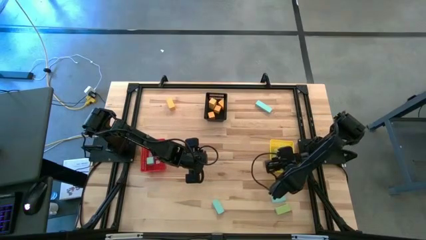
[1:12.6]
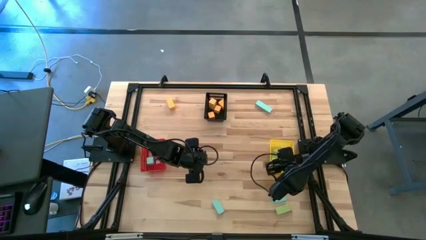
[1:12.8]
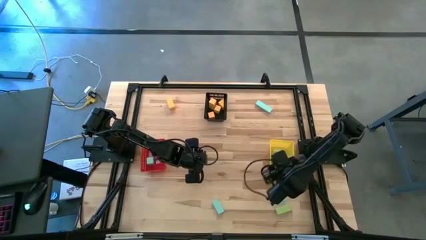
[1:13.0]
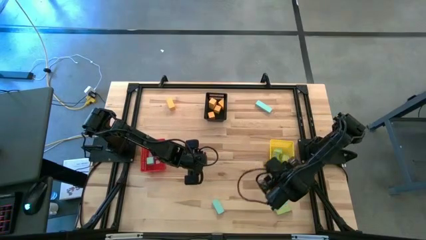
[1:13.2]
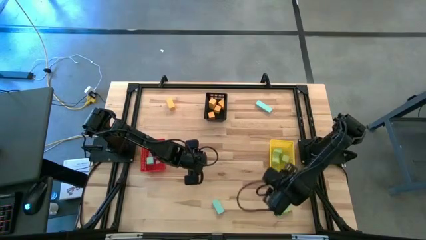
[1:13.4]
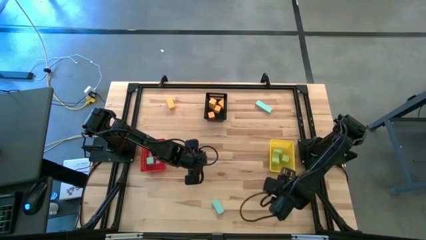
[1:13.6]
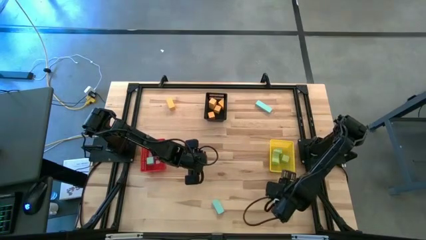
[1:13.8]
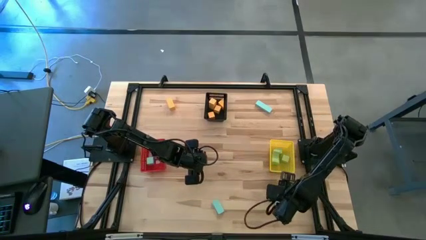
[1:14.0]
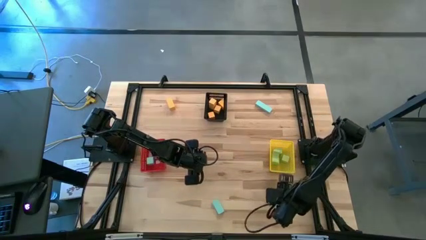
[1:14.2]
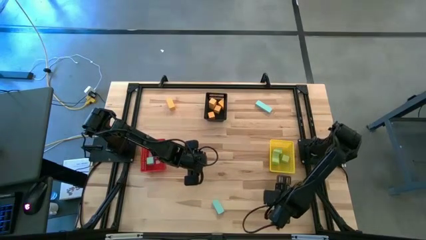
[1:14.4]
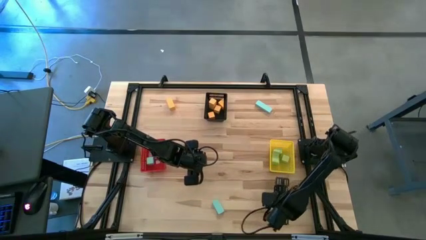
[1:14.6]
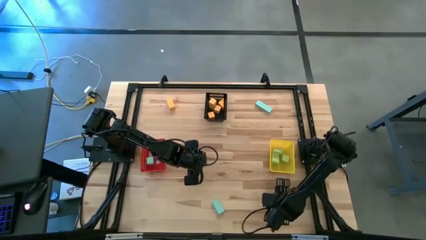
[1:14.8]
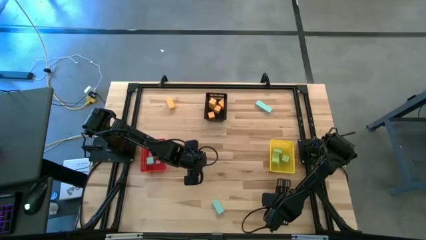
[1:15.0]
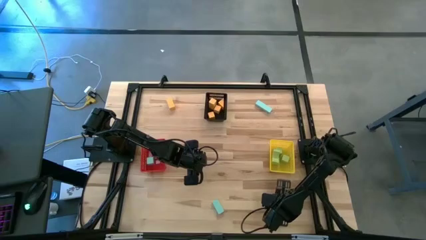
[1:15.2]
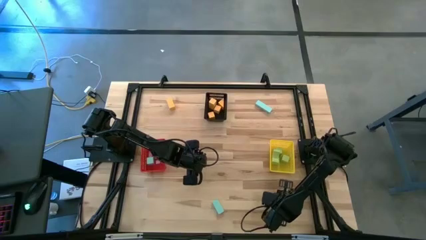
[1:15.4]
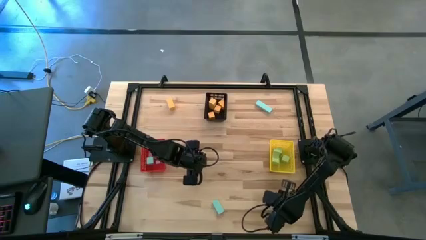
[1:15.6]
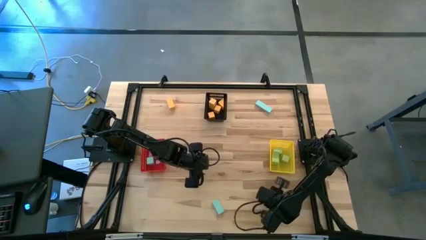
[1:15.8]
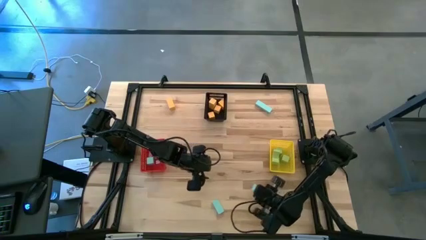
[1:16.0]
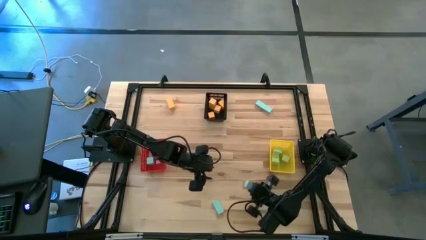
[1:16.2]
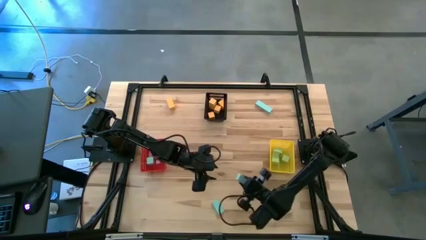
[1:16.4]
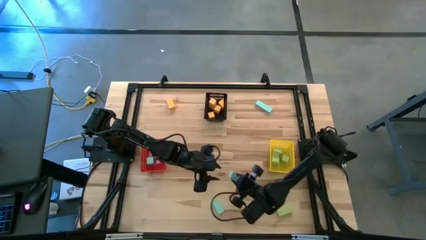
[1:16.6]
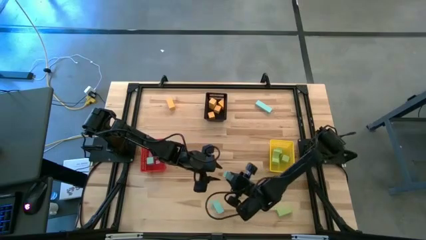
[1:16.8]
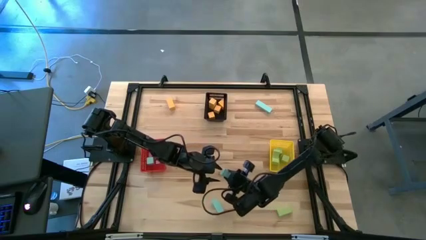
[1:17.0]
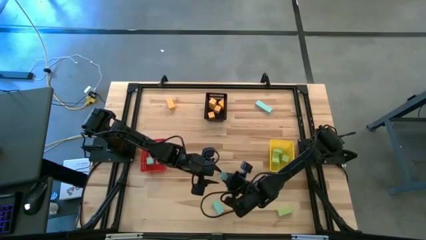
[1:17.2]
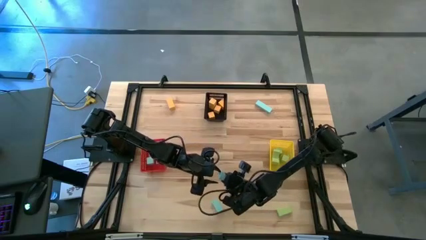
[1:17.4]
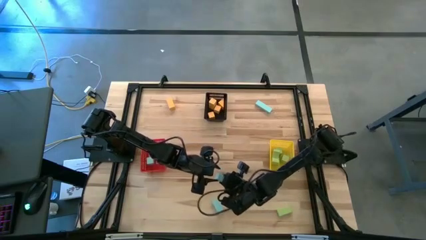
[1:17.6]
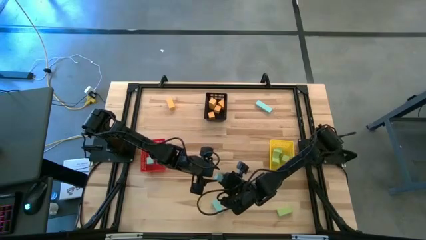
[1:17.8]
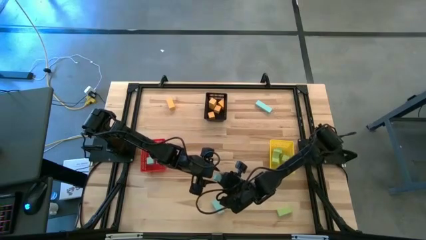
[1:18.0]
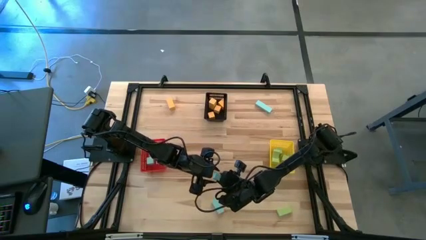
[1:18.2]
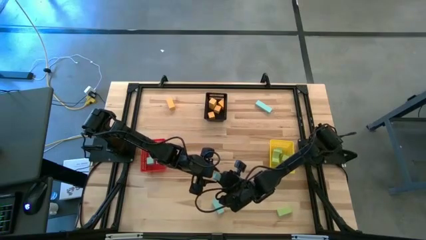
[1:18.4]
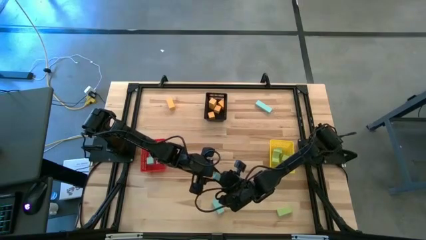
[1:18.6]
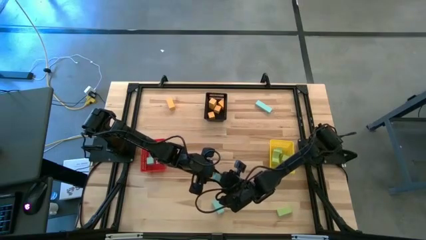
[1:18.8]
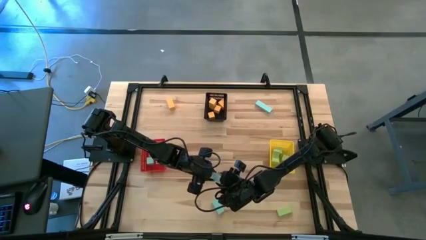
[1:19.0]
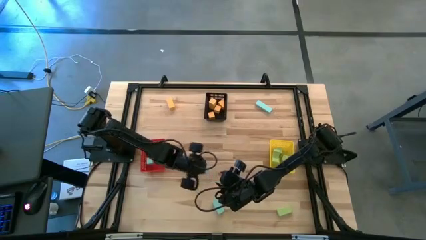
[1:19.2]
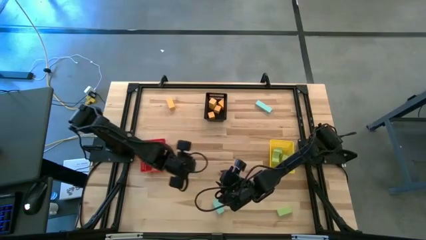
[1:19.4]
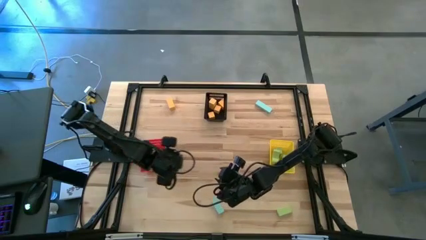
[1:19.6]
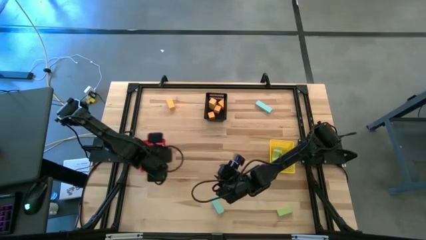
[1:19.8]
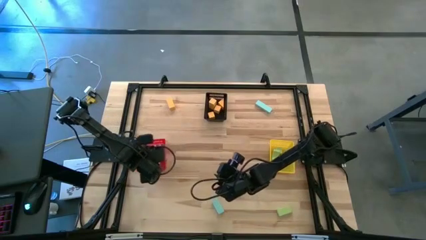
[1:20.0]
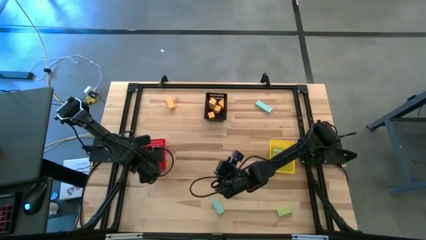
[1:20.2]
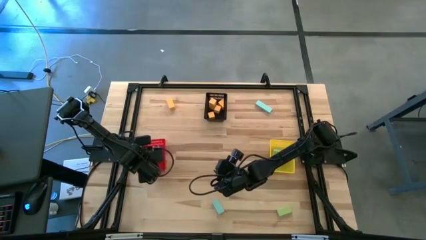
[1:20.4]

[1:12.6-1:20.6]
Task: Sort & place blocks by color
Put the blue block into the red bin

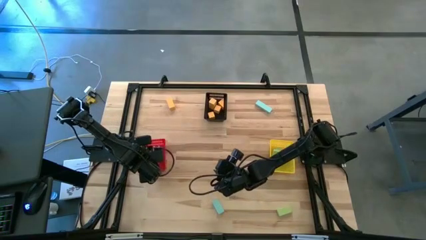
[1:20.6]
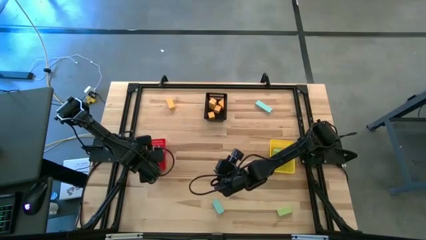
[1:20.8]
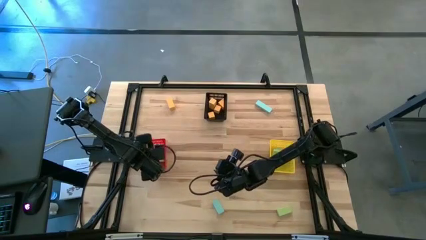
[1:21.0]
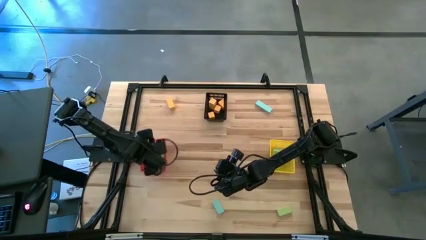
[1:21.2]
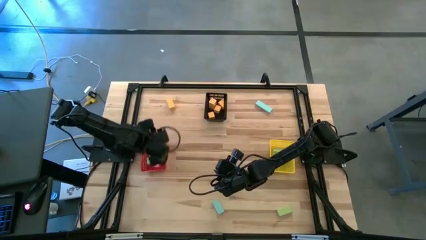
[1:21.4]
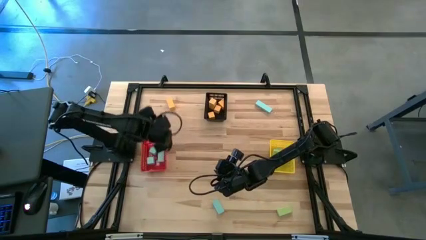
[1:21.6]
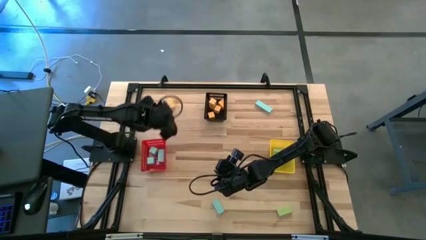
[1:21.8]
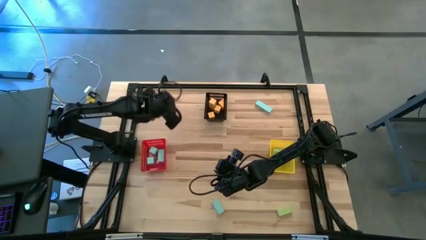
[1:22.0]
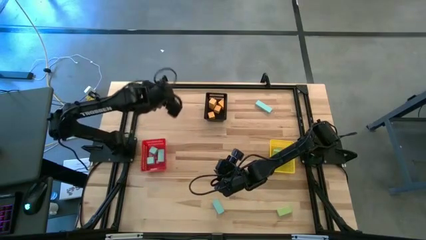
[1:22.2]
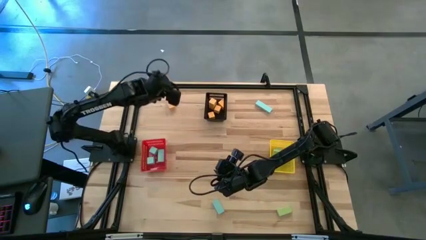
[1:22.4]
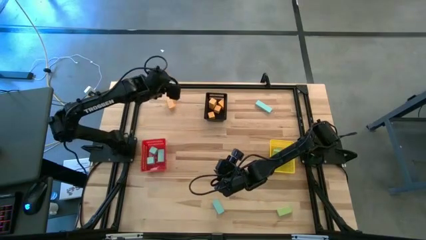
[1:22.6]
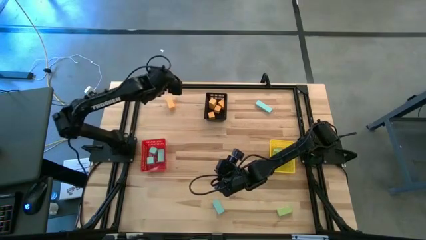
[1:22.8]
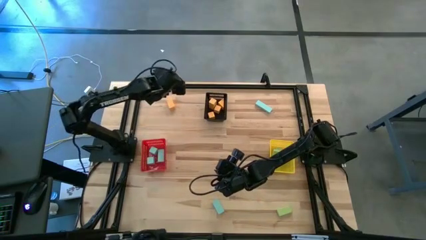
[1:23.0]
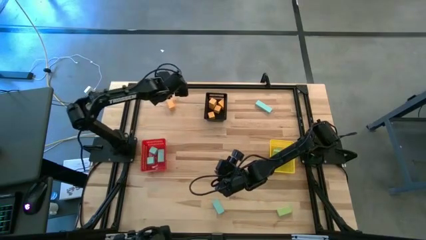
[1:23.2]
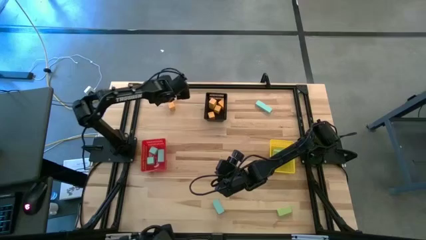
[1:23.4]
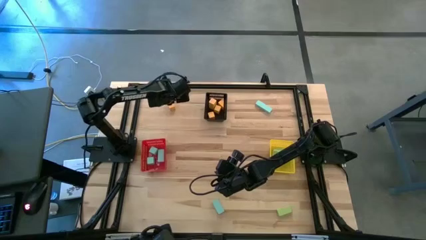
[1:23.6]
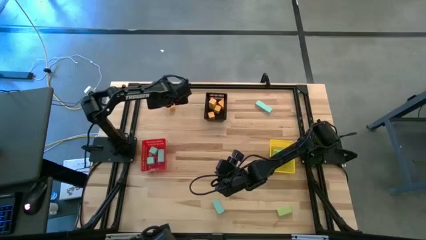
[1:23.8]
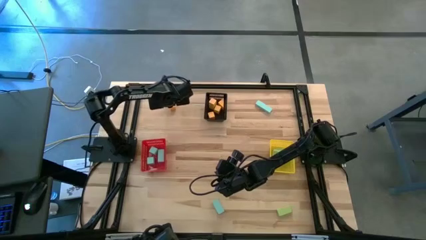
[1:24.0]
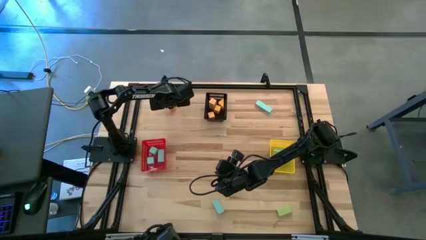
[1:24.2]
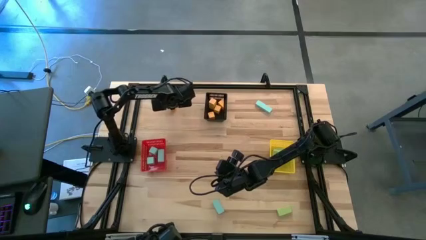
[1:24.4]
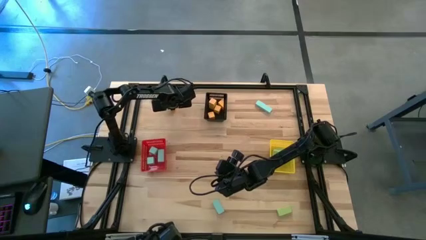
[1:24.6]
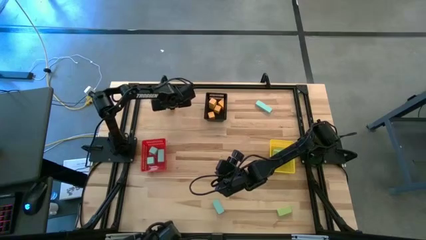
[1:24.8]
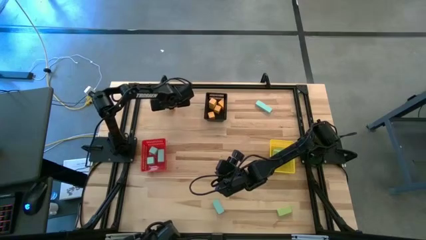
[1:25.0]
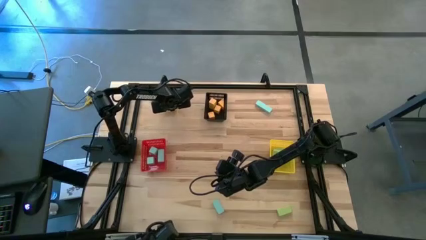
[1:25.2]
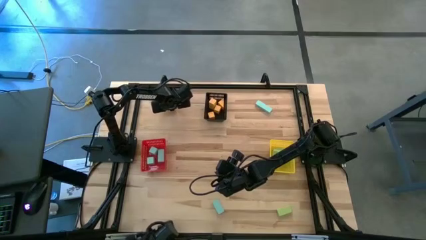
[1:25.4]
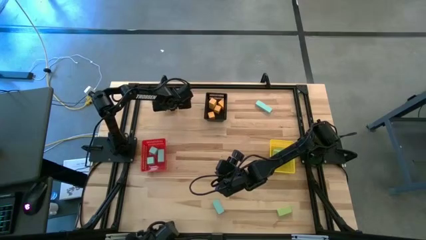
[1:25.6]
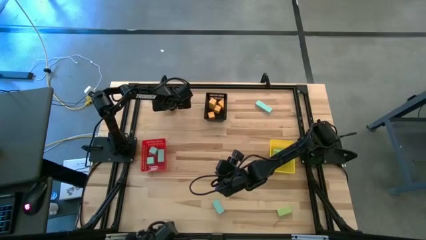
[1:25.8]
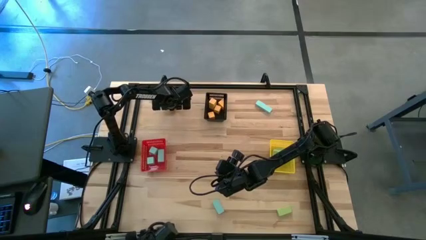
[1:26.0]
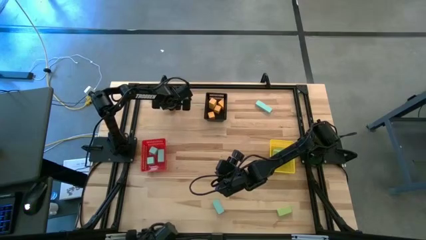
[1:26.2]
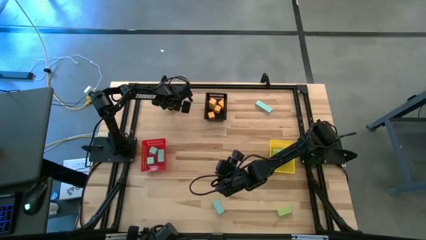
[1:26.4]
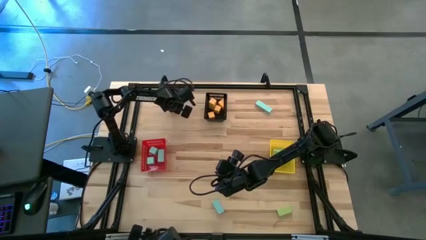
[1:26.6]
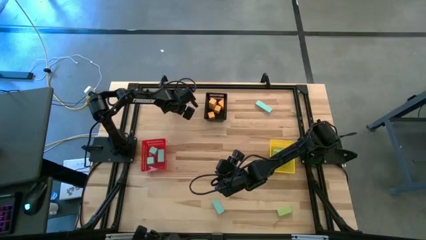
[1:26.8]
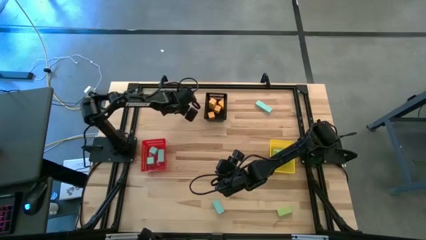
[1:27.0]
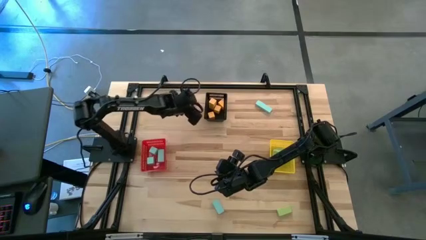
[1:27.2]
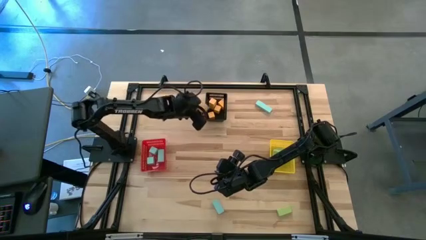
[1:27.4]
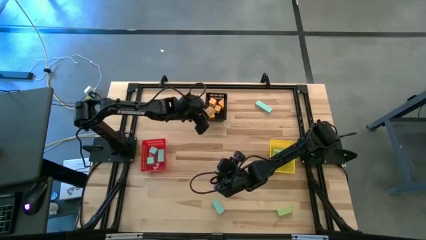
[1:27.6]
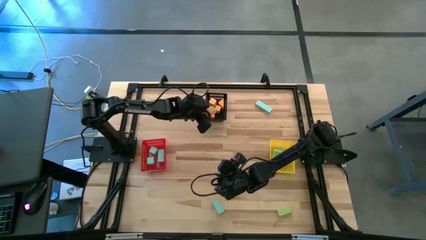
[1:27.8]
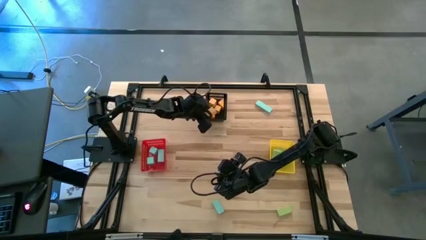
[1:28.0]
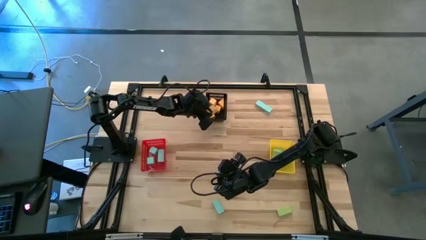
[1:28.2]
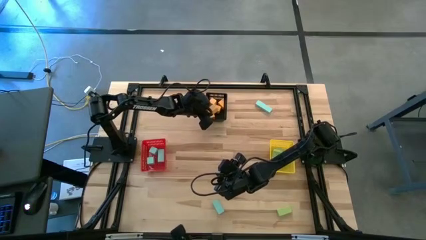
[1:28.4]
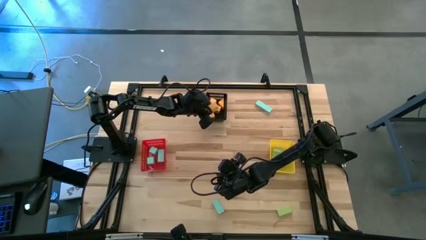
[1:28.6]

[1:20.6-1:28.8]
Put the yellow block into the black bin
